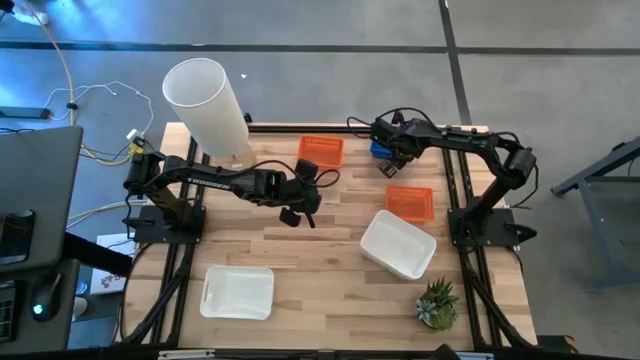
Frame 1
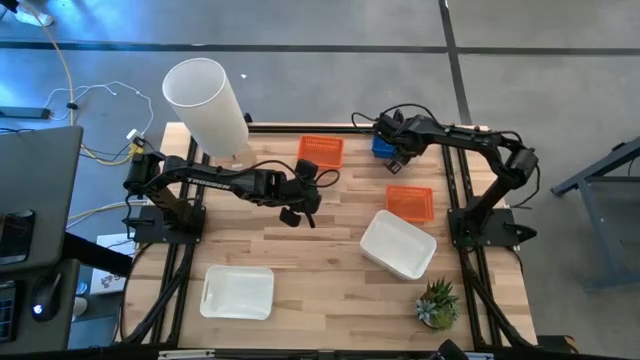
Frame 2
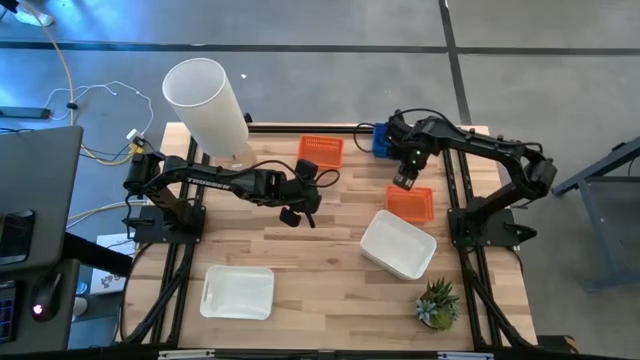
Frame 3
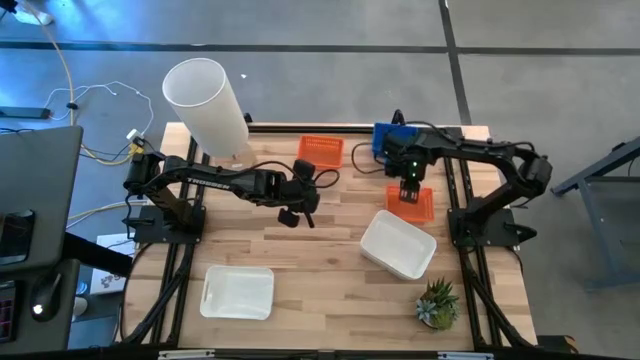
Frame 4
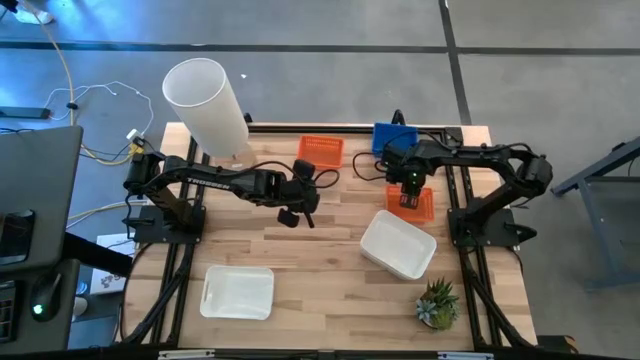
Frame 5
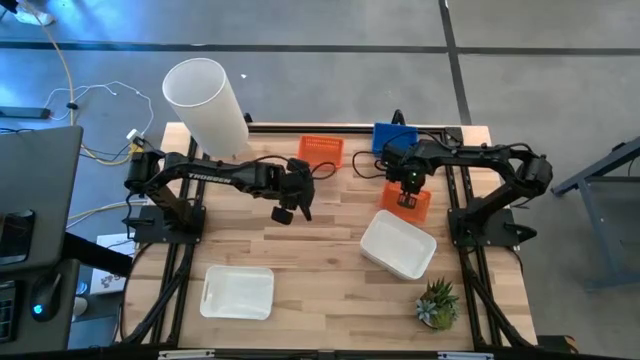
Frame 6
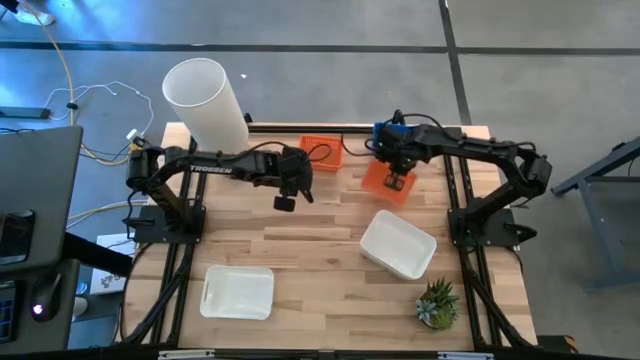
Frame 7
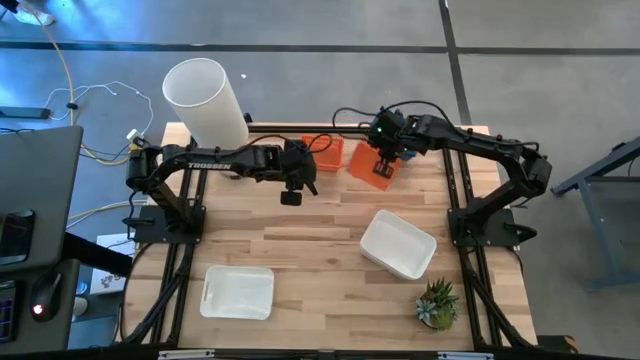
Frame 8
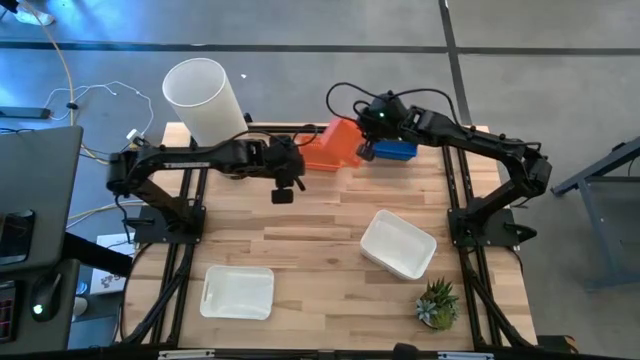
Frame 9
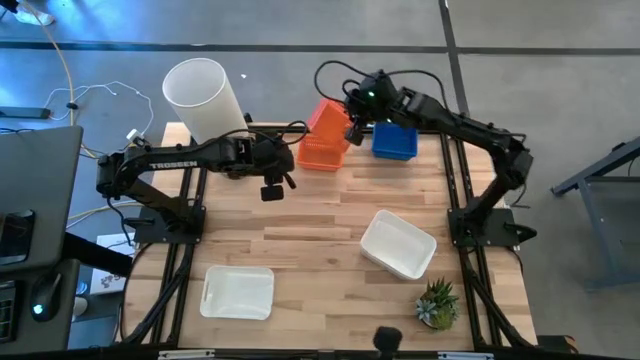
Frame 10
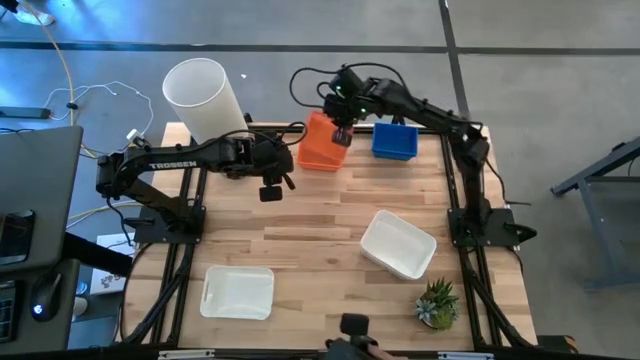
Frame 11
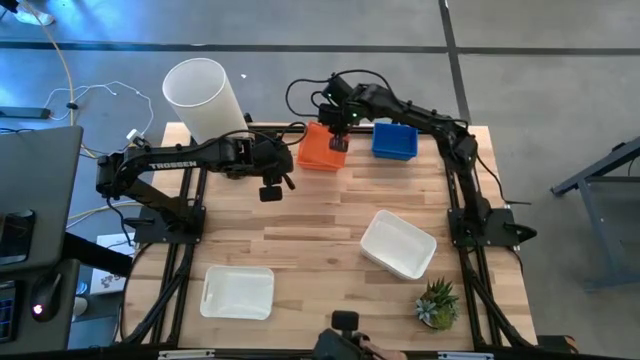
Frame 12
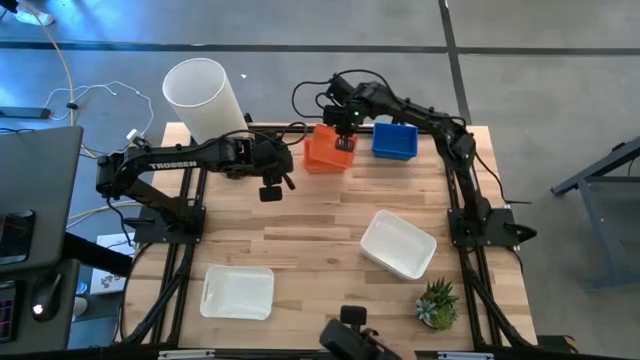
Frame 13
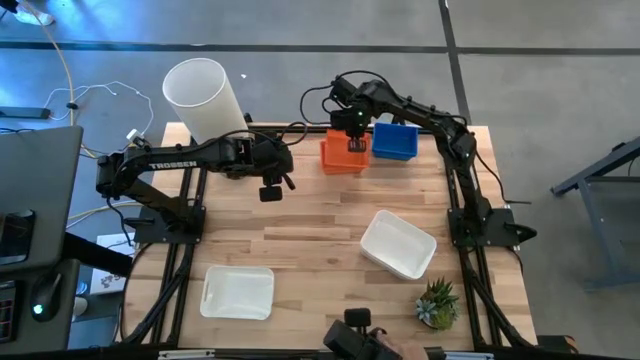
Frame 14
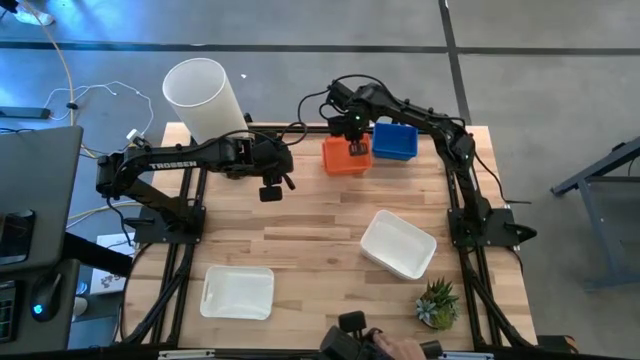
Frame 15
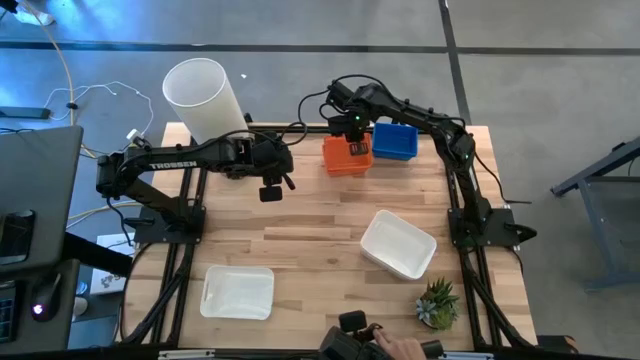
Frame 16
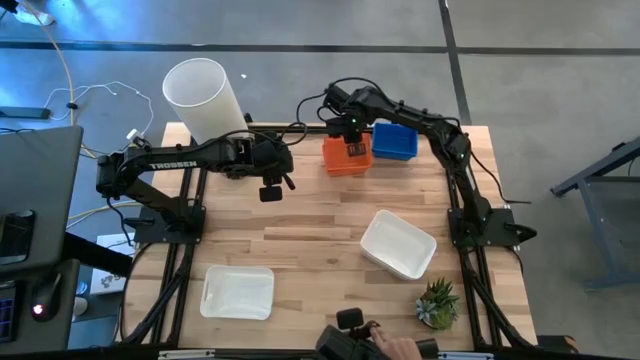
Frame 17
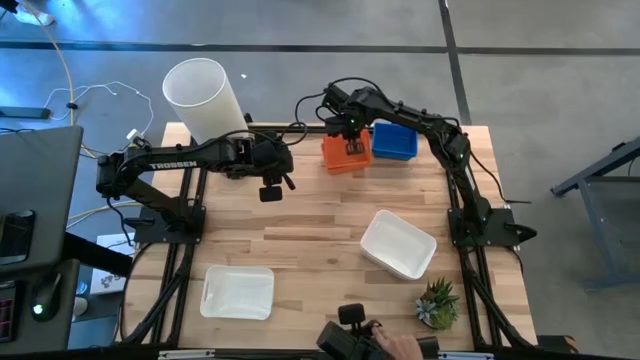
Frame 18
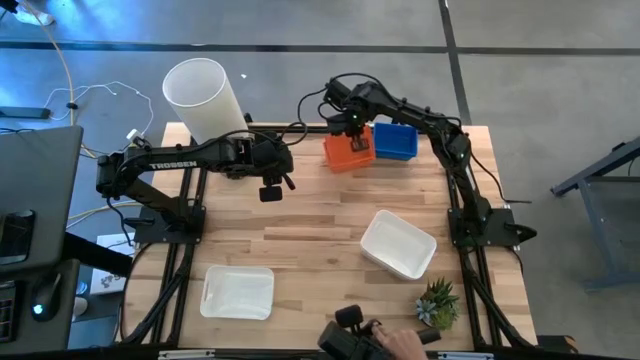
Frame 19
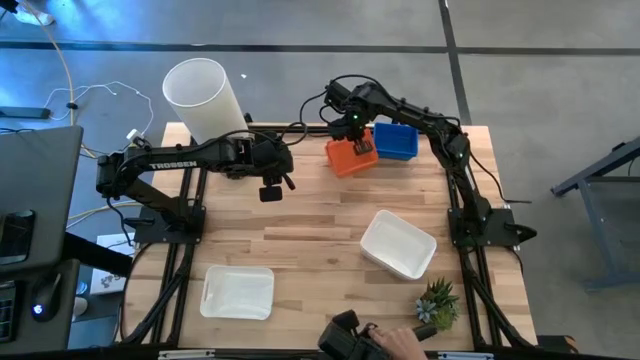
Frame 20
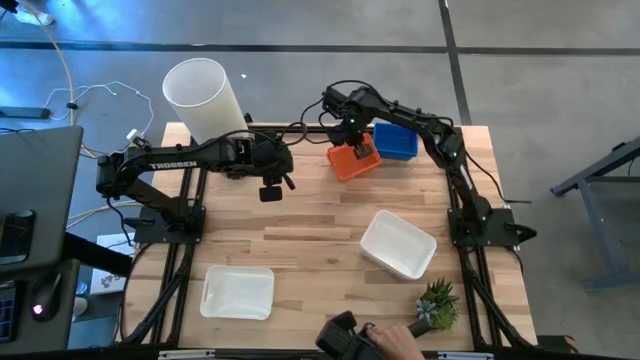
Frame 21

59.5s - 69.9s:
Stack the right orange bin on top of the other orange bin

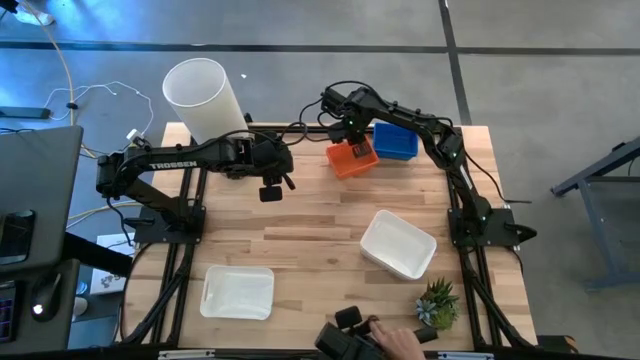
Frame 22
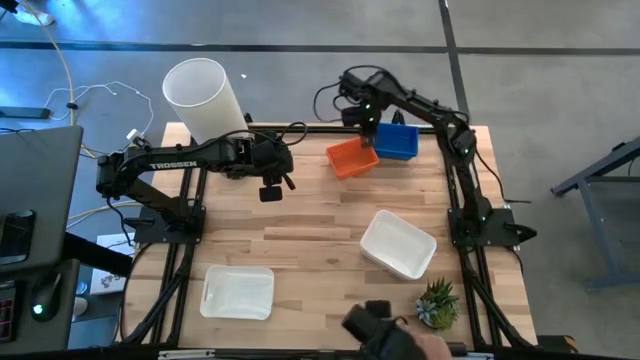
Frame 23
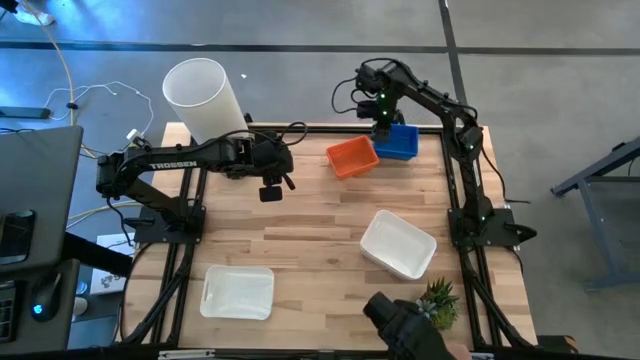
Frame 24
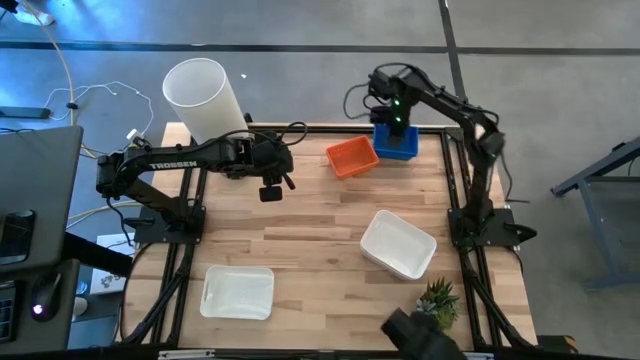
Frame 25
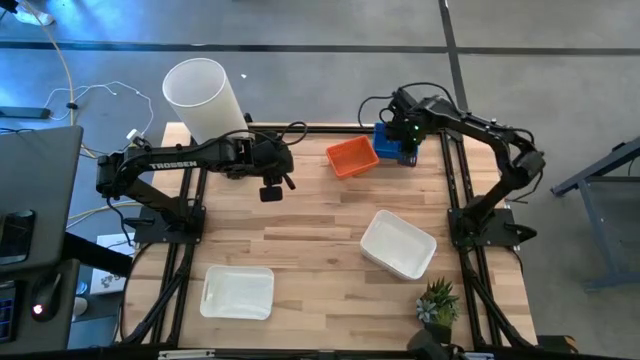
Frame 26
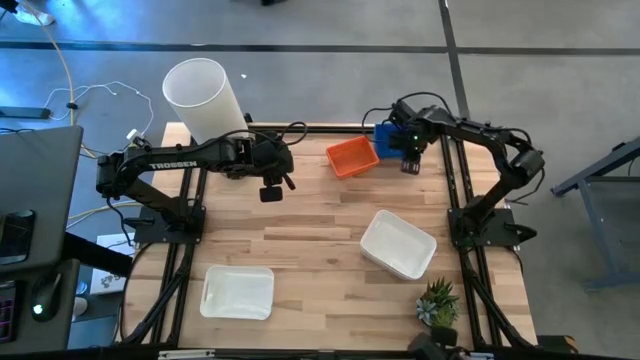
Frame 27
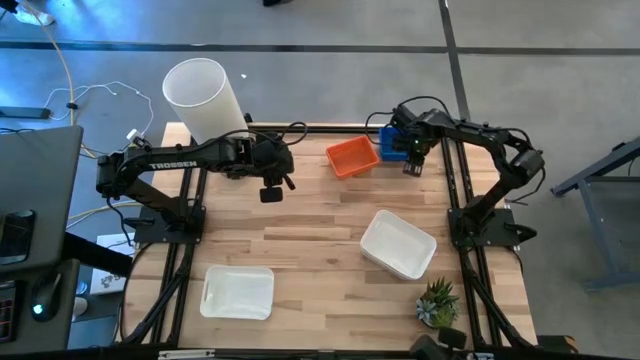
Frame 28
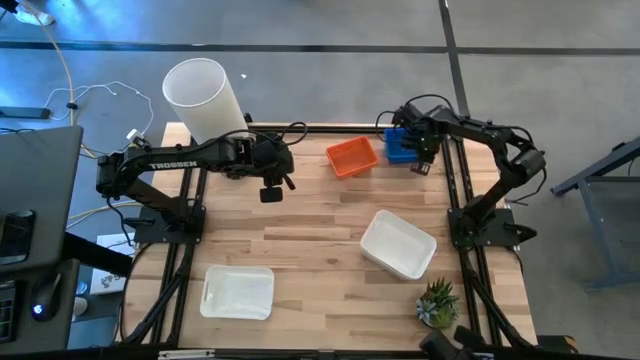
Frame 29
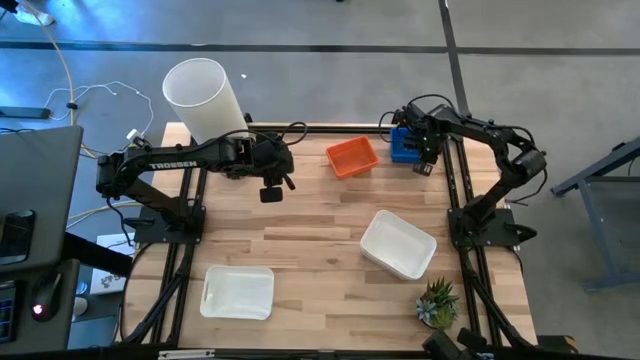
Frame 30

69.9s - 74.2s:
Adjust the blue stacked bins

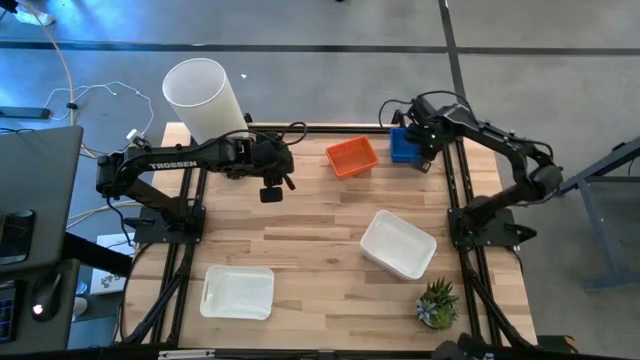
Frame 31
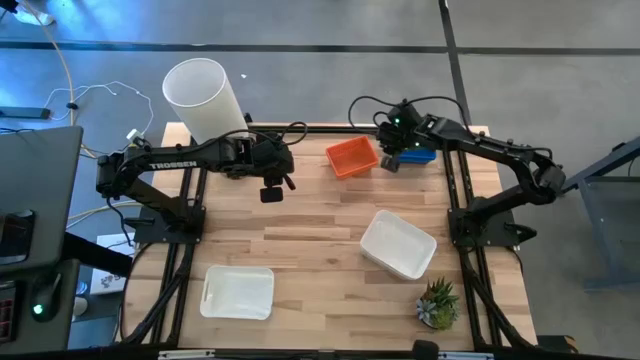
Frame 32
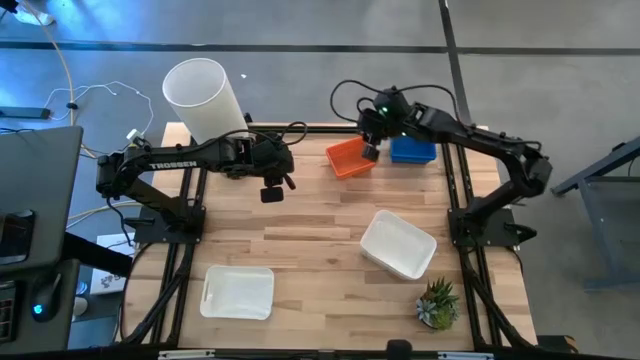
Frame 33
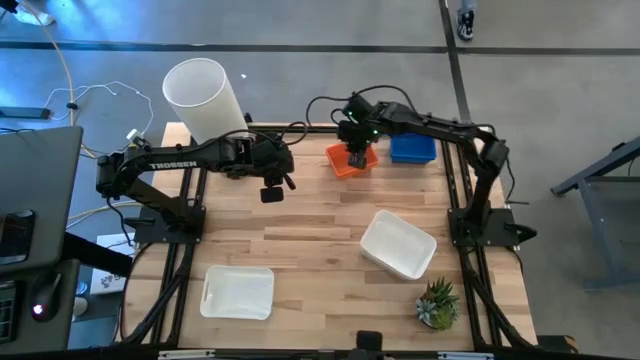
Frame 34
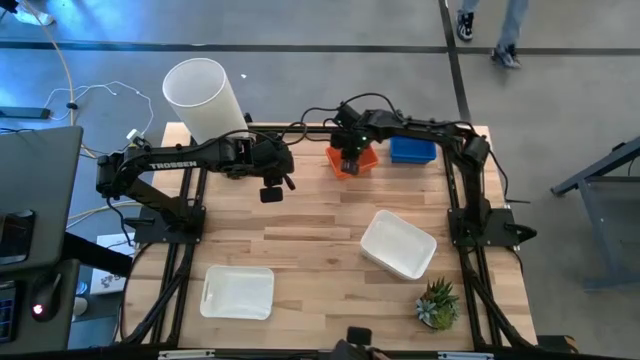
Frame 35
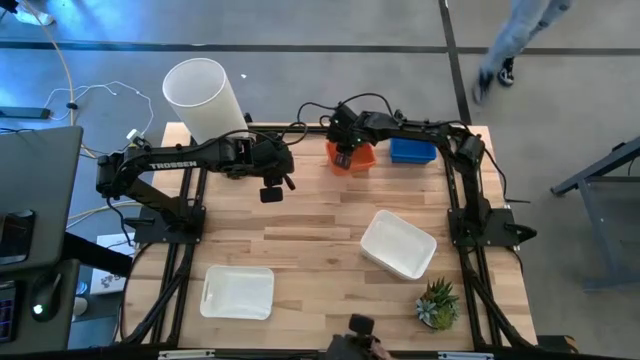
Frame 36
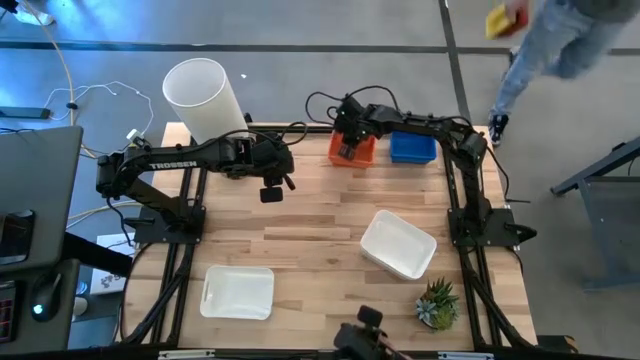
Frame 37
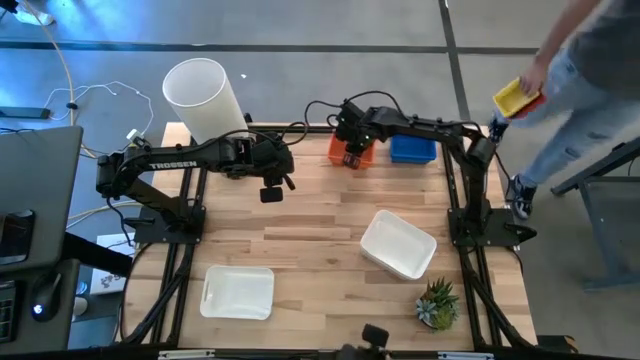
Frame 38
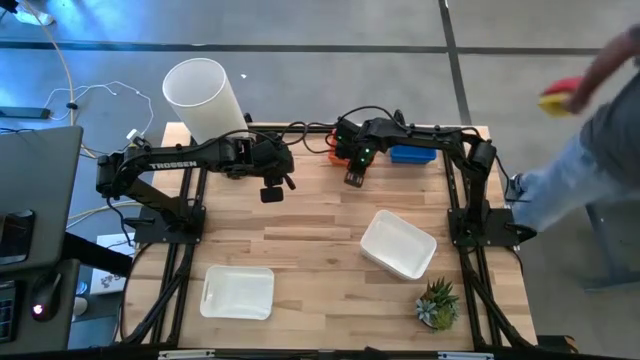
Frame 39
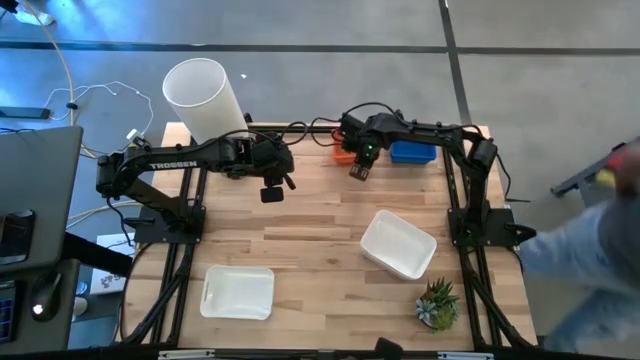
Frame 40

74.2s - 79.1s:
Adjust the stacked orange bins
